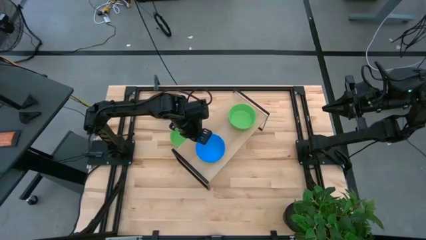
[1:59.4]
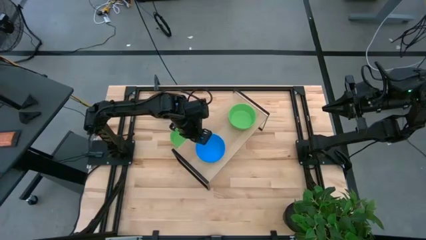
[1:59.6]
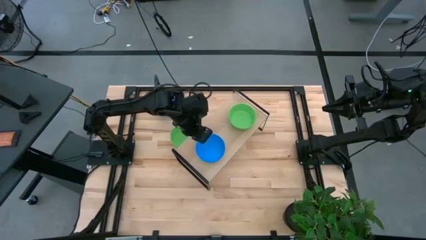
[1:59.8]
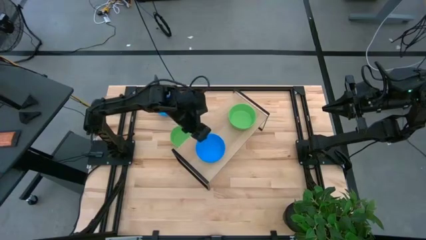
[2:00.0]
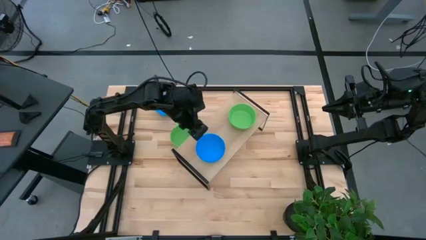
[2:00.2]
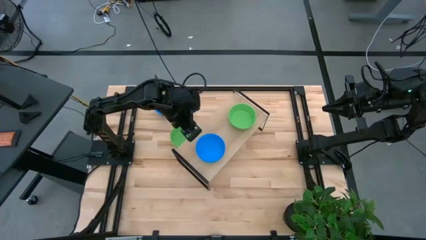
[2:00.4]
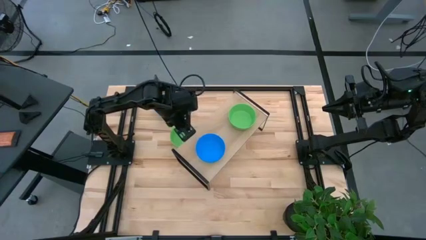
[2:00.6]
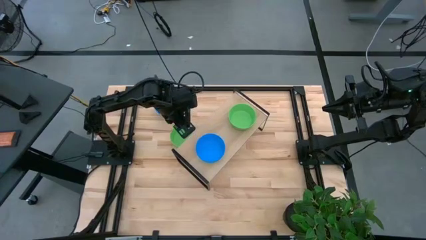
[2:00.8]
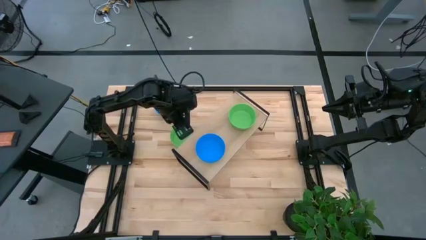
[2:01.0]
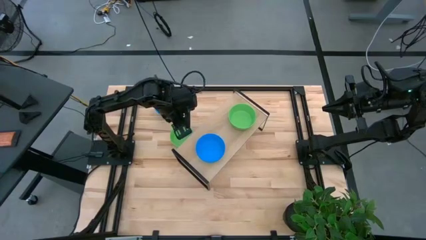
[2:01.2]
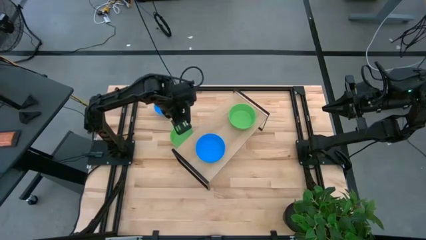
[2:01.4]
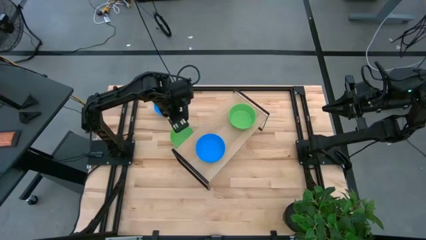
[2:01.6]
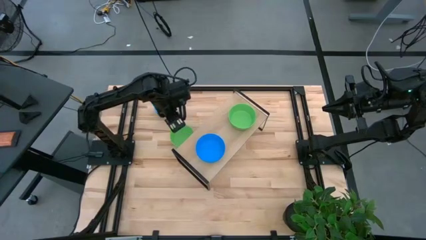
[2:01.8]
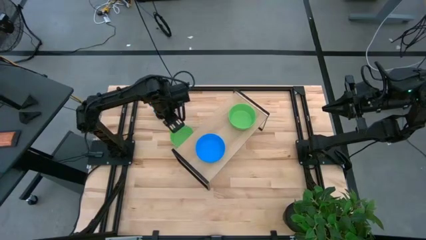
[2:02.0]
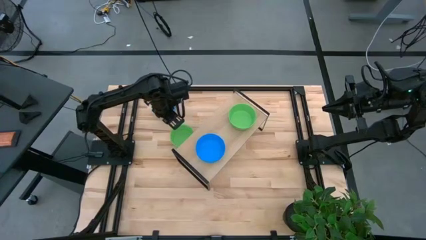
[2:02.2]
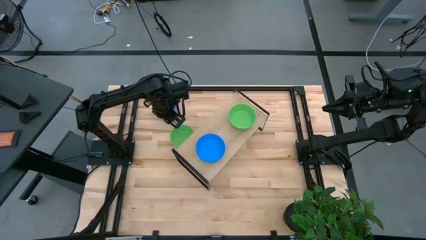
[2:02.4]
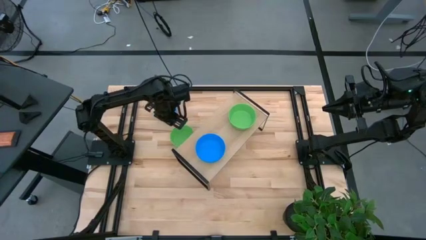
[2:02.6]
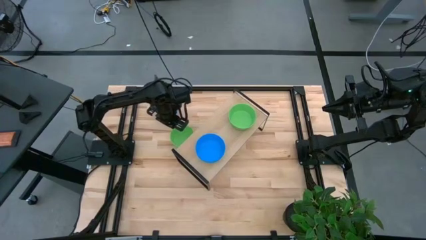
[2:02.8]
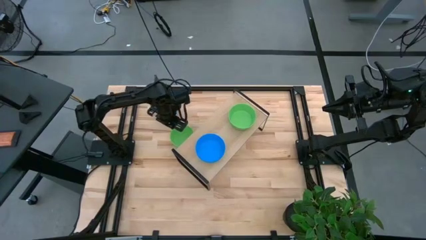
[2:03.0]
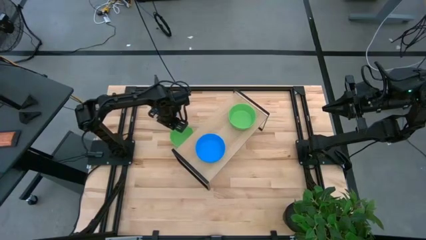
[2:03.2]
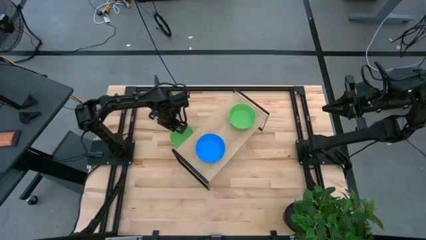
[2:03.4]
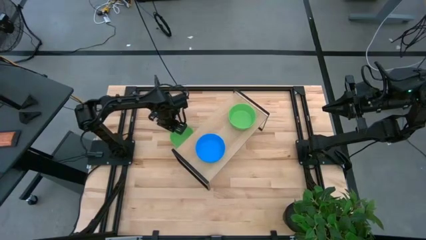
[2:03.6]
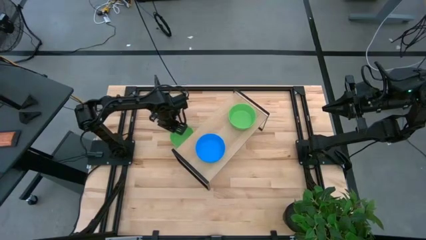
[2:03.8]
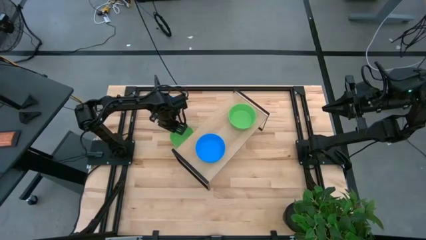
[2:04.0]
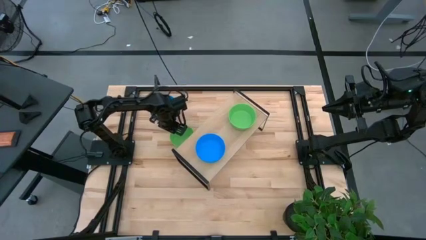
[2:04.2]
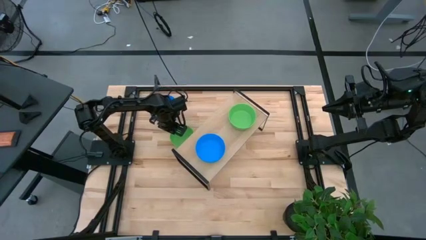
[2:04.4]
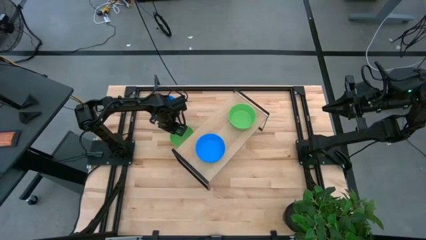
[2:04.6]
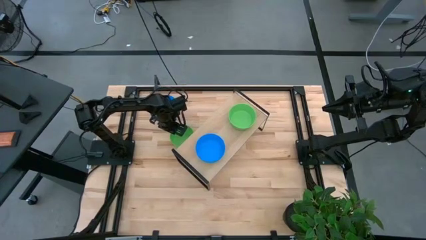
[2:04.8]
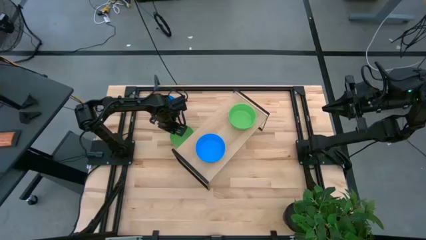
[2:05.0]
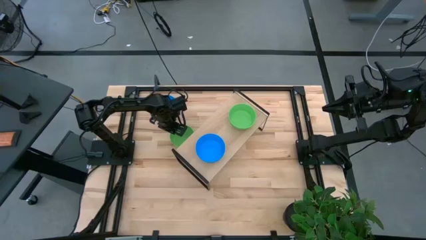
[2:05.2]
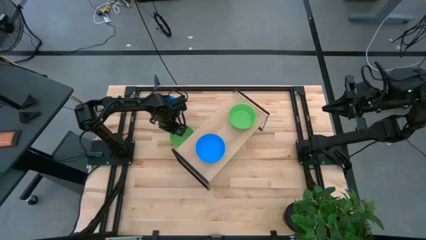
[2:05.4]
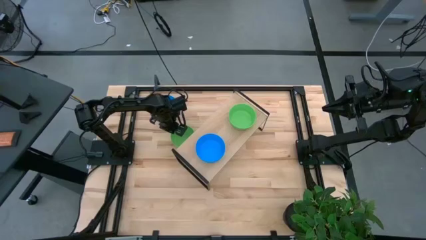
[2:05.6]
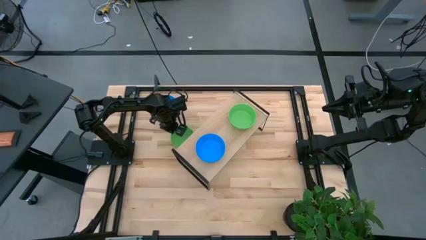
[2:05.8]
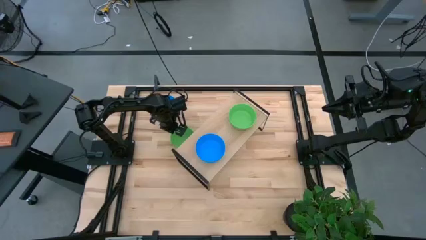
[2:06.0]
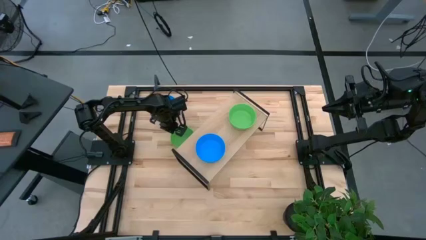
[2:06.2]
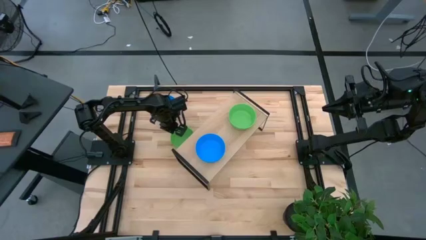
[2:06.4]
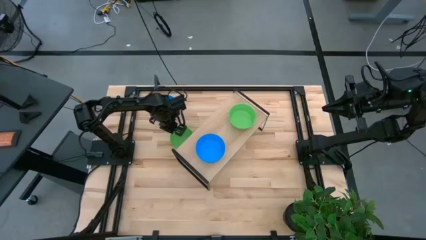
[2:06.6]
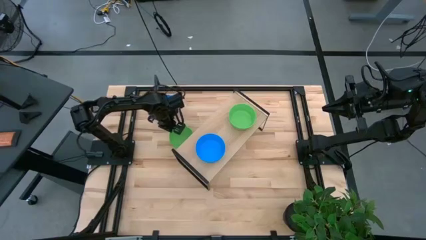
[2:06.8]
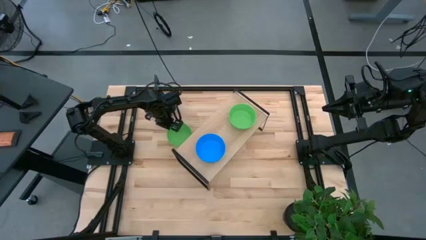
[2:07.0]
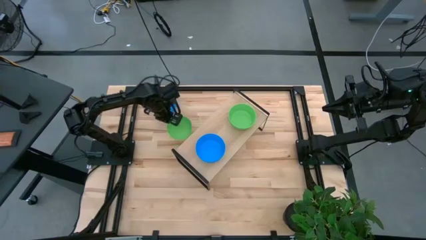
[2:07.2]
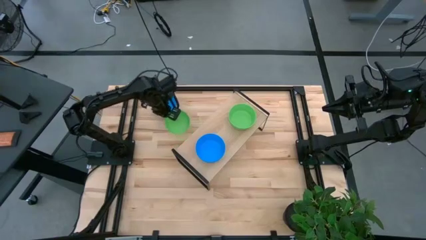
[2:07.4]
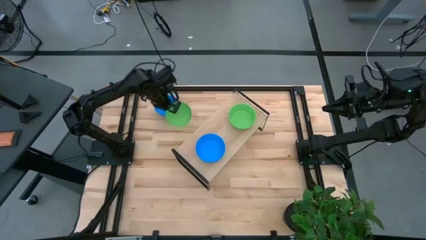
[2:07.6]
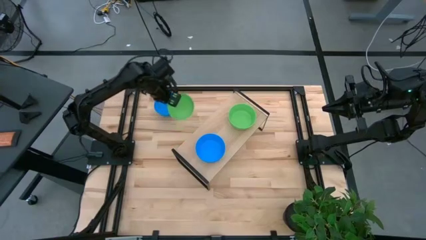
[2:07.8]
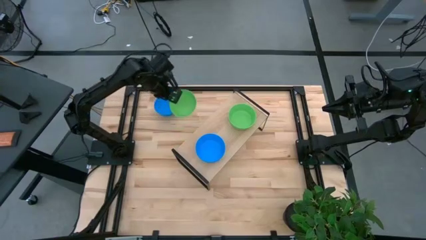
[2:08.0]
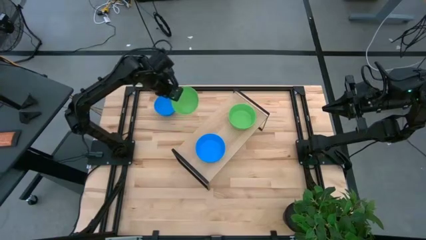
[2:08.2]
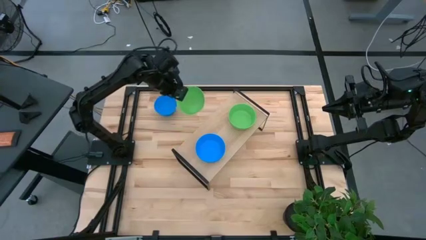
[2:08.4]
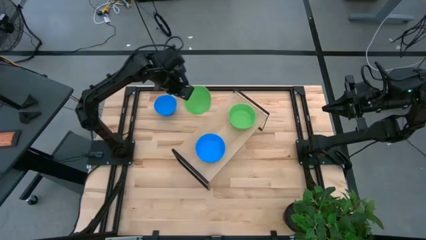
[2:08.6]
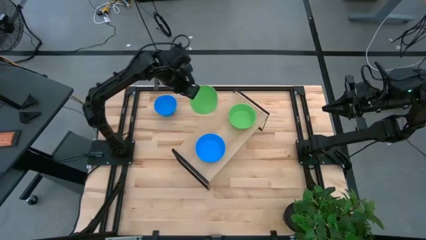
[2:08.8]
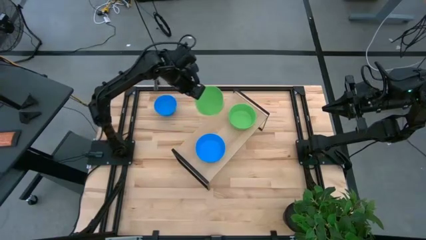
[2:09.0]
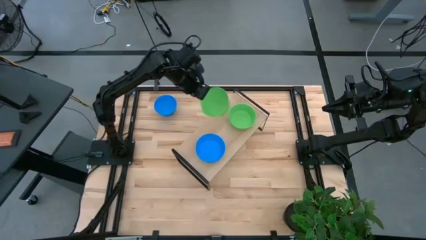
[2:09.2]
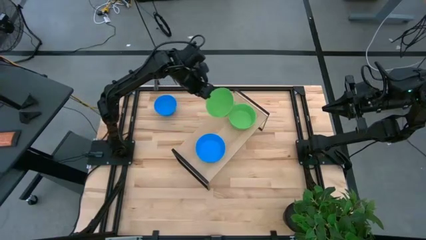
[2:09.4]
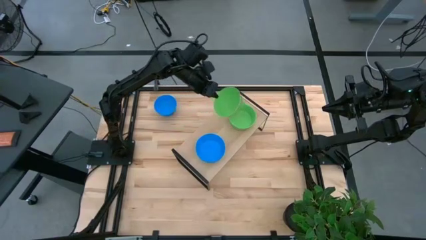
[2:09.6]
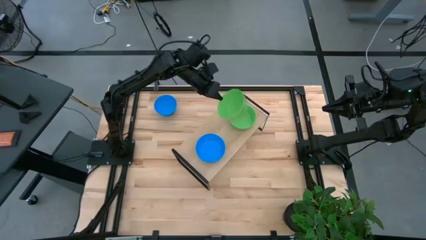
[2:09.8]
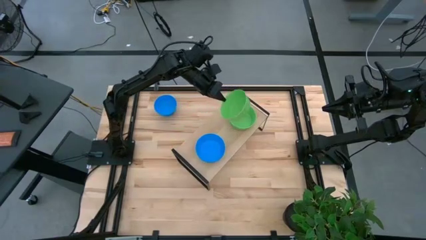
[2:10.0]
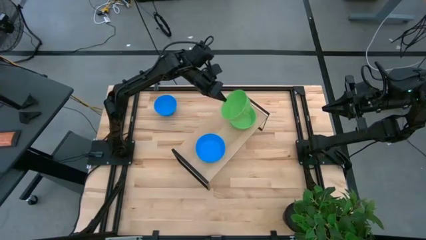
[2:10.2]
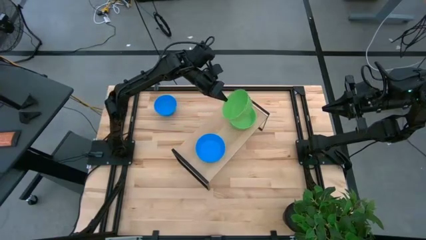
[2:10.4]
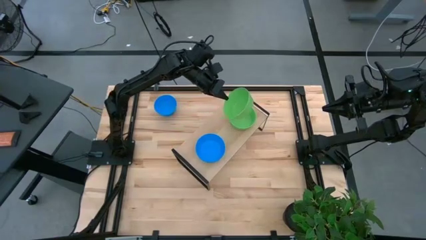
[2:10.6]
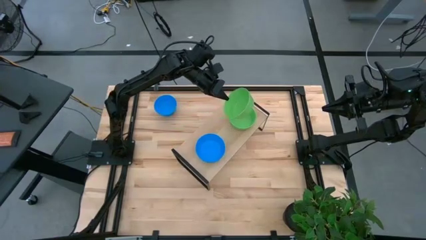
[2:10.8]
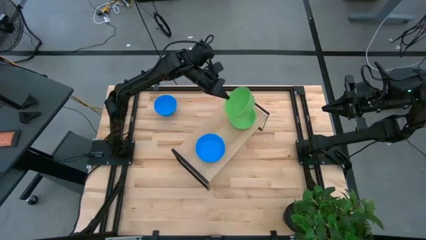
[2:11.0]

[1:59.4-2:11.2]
Task: Pick & Place Mini bowls
Stack the green bowl on top of the green bowl on the shelf

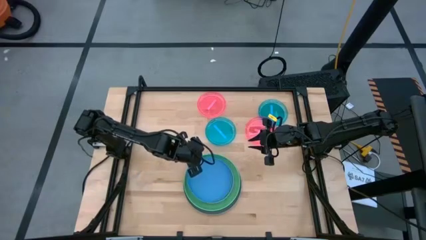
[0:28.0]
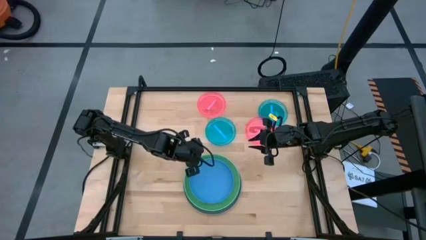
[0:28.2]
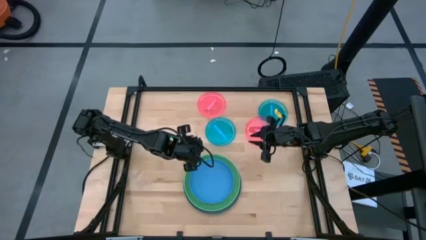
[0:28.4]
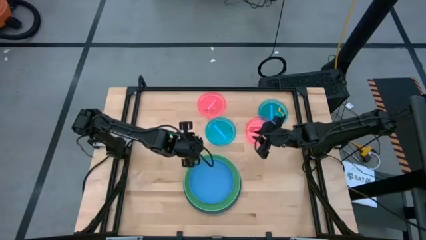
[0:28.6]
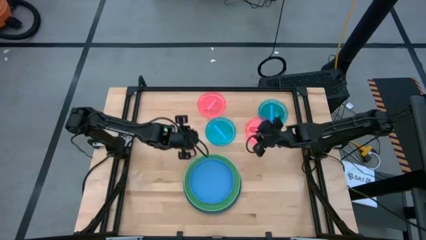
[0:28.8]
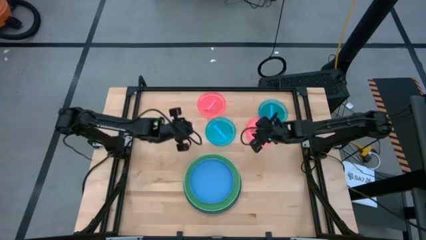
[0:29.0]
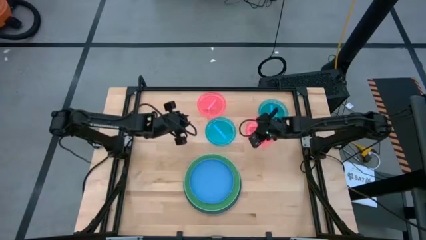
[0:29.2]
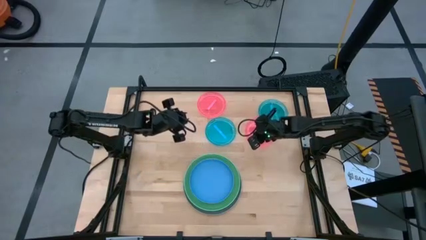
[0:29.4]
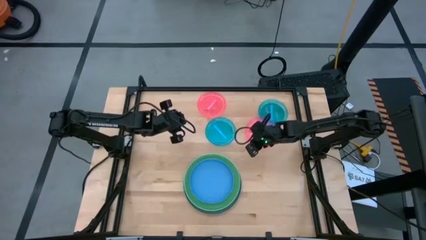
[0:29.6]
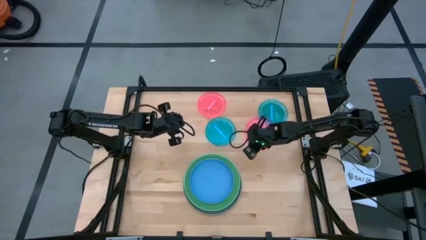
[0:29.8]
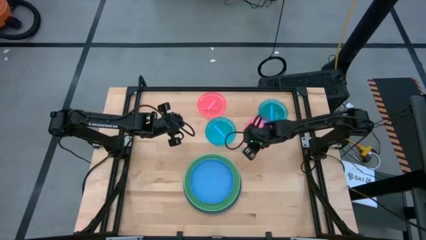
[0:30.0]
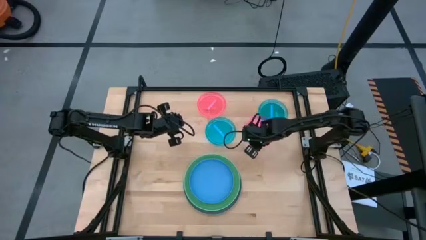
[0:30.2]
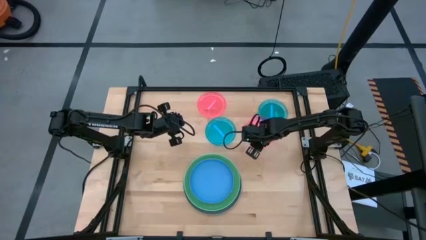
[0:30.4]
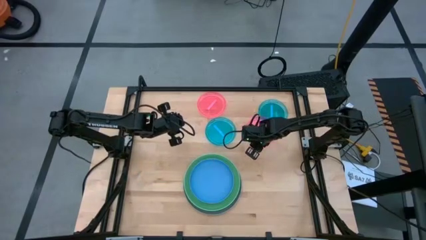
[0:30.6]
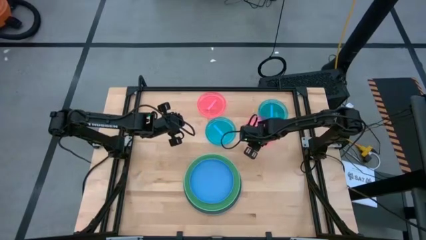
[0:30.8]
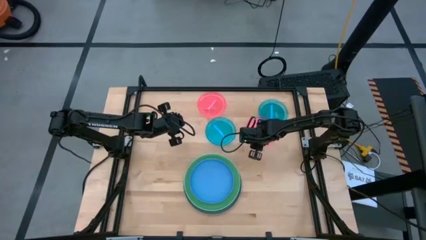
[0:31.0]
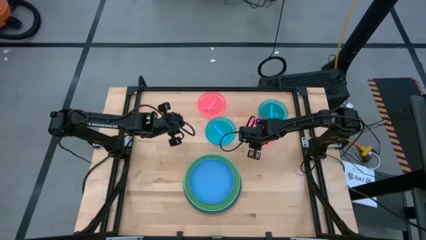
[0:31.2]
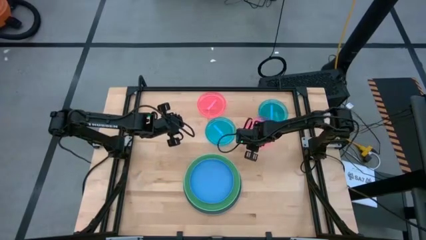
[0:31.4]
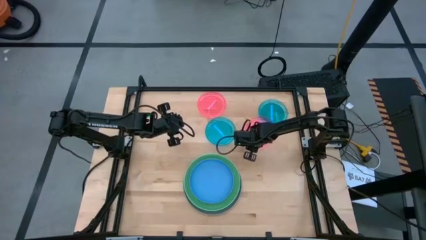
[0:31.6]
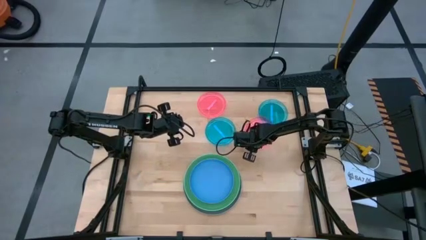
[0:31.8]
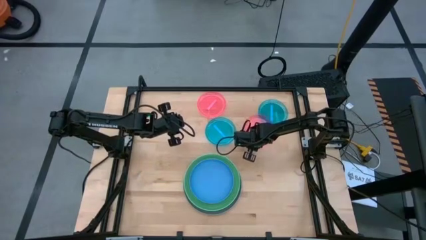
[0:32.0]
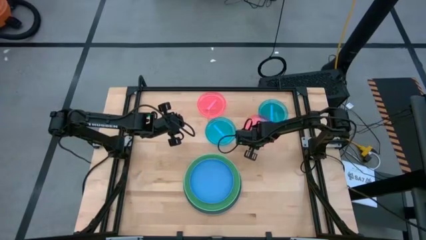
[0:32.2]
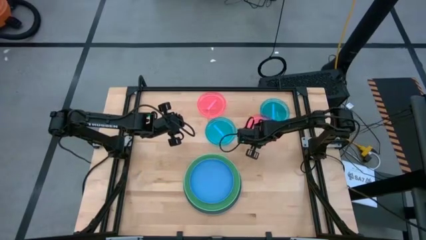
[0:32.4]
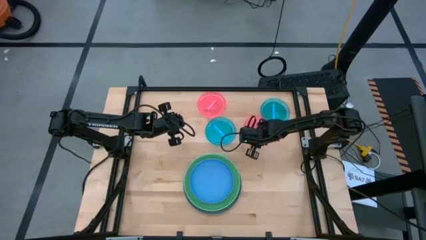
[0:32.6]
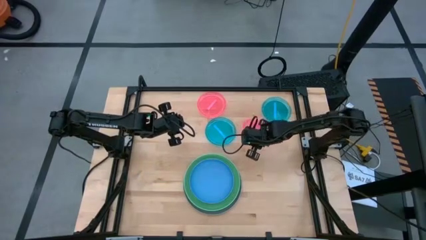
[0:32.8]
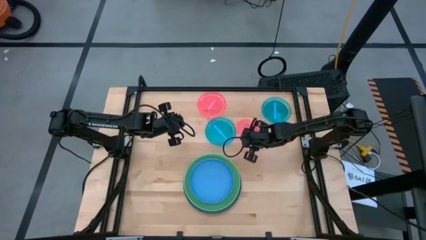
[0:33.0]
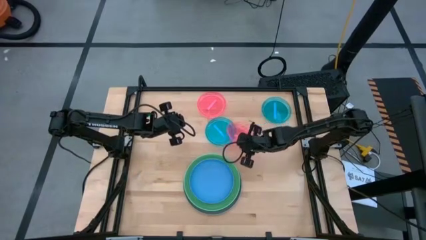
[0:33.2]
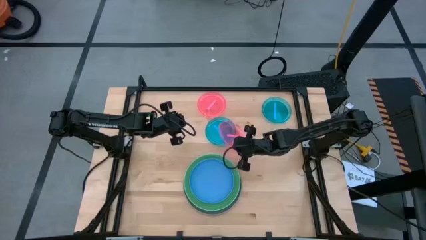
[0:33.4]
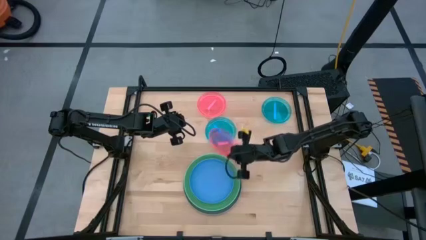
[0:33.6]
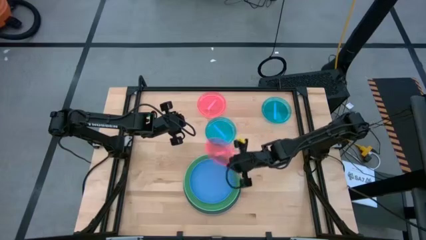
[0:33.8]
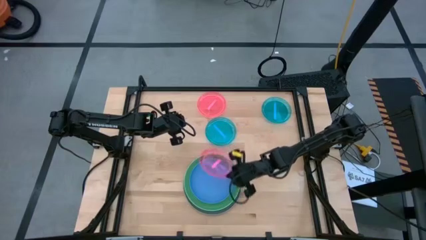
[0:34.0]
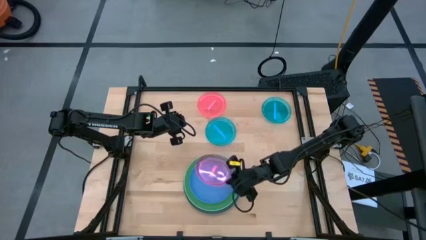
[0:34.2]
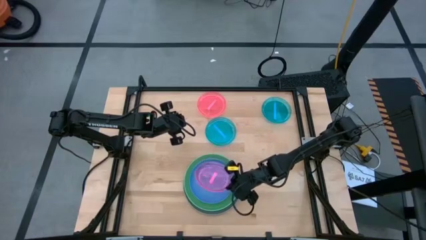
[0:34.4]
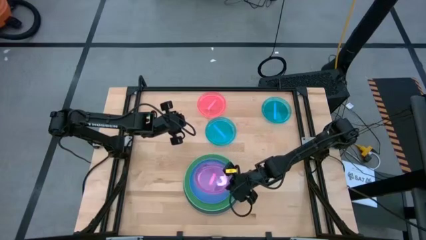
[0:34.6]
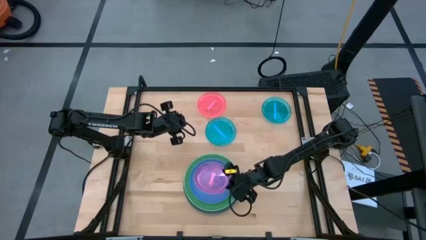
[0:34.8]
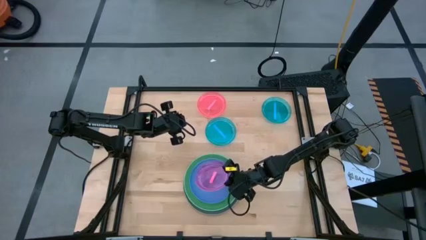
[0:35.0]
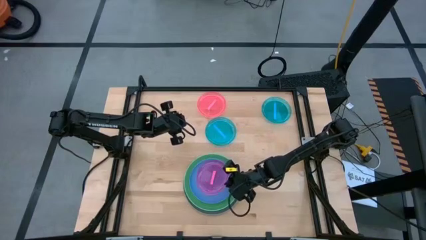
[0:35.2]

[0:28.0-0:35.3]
Task: Stack plastic plates
Stack the bottom small pink plate on top of the blue plate
